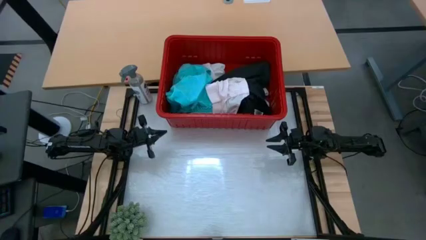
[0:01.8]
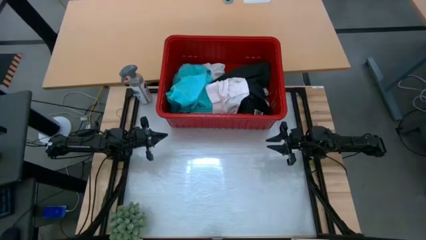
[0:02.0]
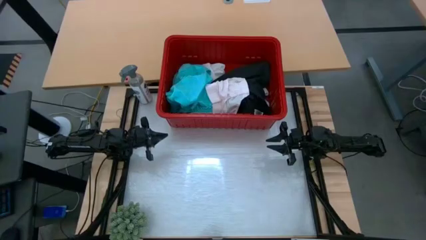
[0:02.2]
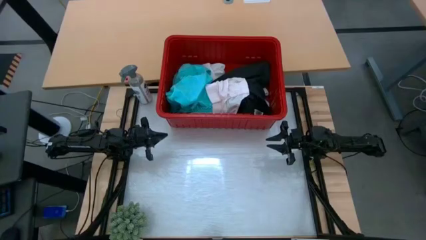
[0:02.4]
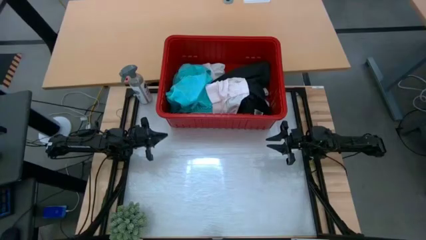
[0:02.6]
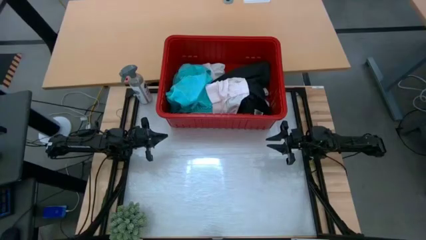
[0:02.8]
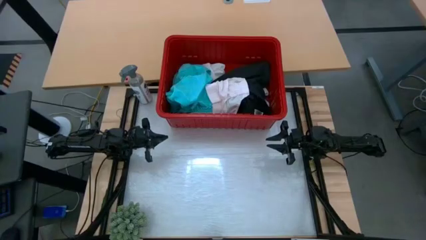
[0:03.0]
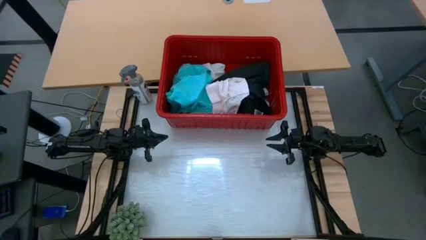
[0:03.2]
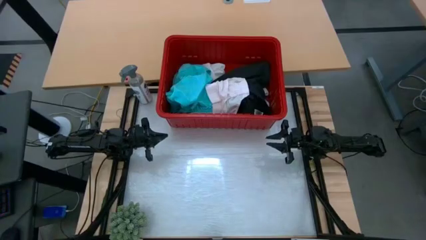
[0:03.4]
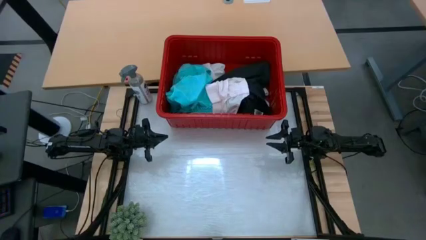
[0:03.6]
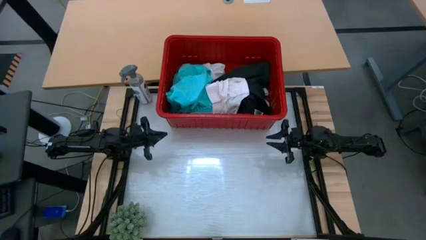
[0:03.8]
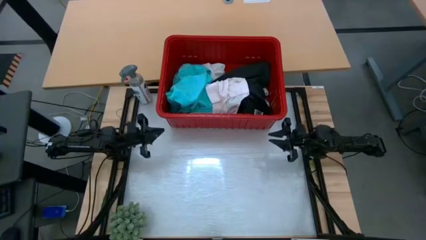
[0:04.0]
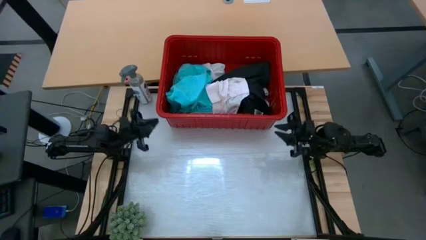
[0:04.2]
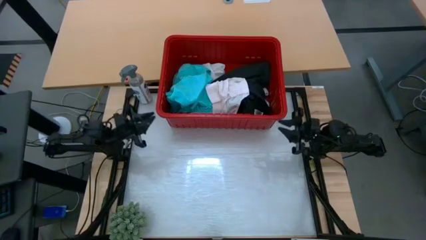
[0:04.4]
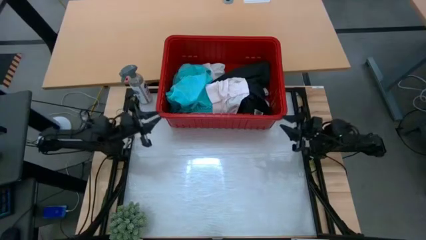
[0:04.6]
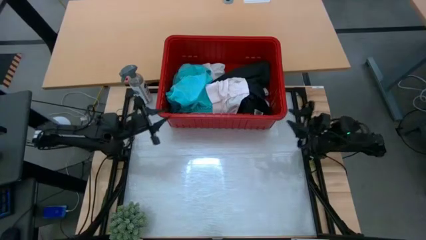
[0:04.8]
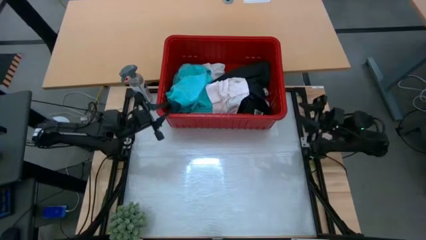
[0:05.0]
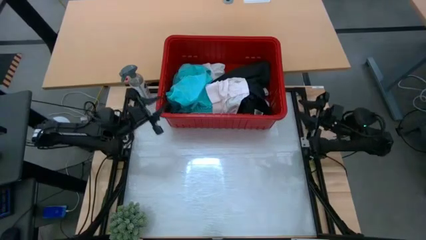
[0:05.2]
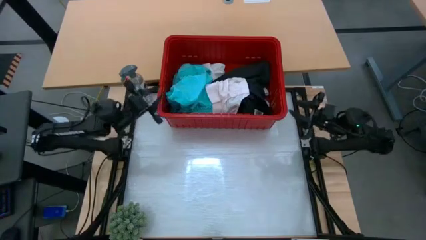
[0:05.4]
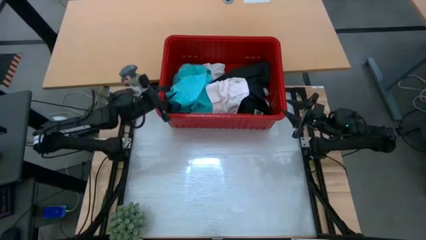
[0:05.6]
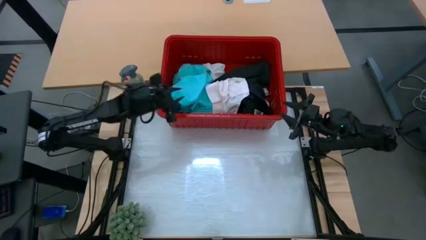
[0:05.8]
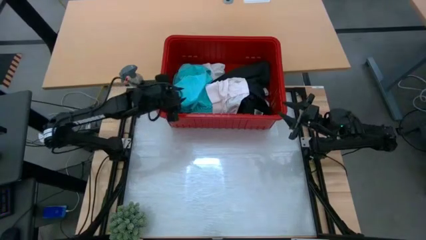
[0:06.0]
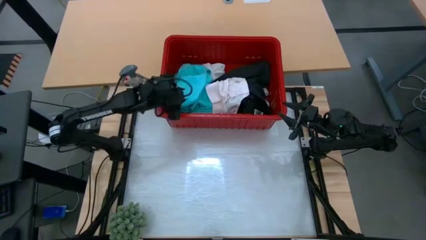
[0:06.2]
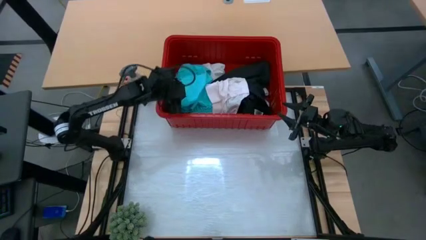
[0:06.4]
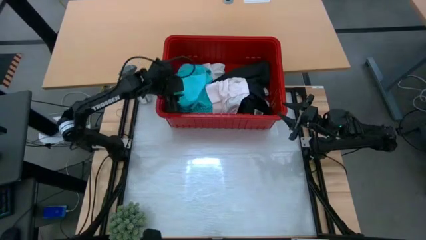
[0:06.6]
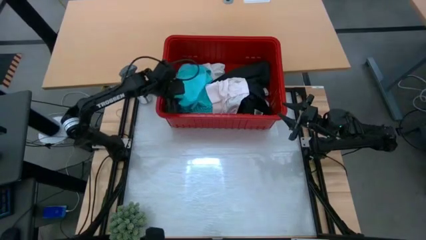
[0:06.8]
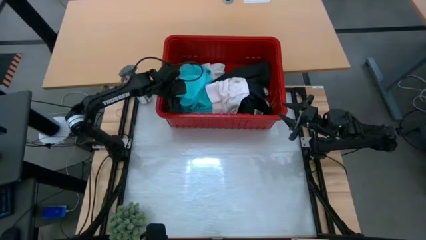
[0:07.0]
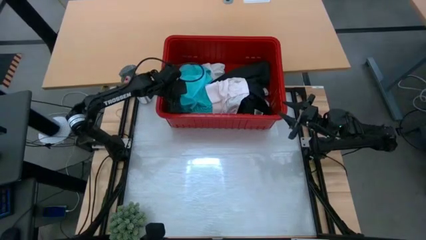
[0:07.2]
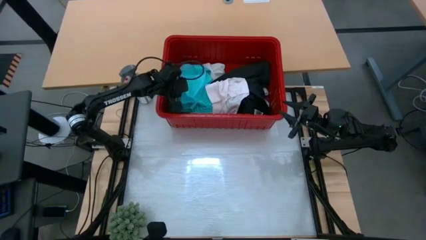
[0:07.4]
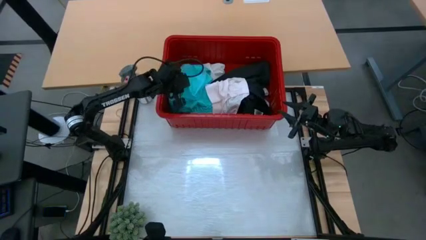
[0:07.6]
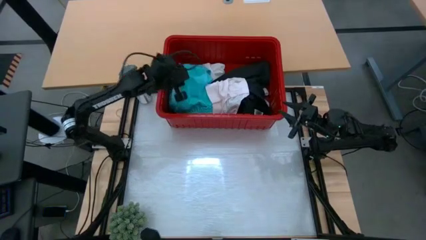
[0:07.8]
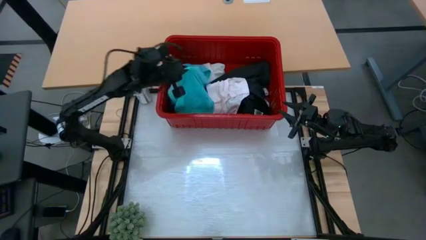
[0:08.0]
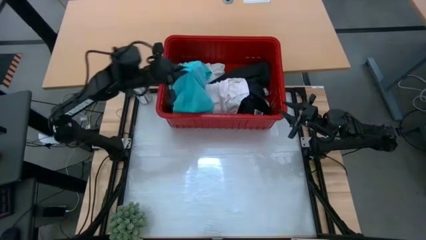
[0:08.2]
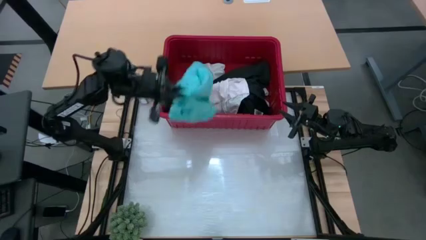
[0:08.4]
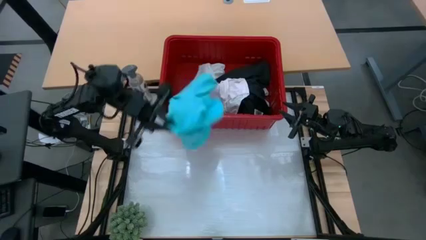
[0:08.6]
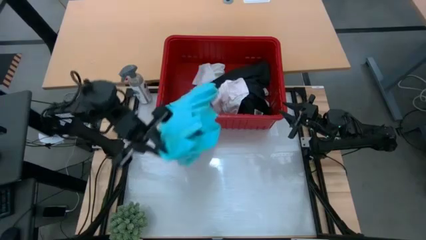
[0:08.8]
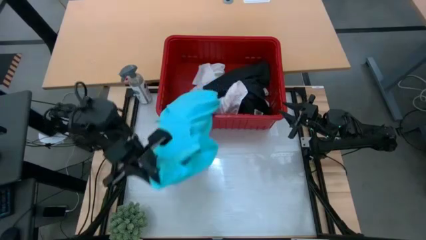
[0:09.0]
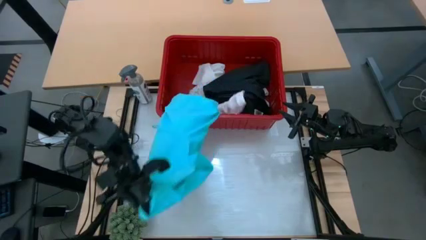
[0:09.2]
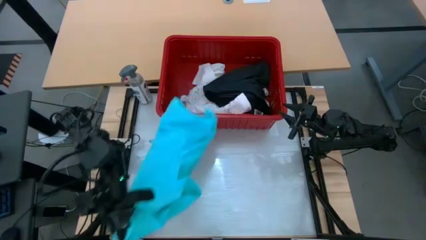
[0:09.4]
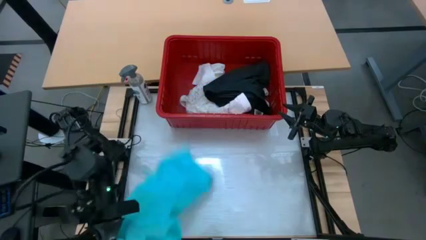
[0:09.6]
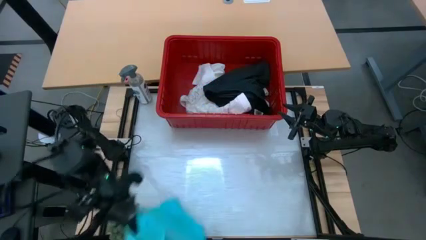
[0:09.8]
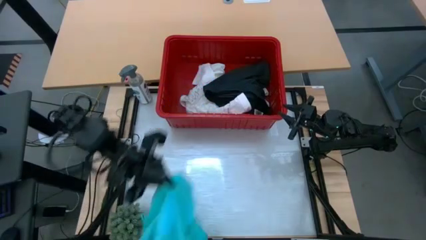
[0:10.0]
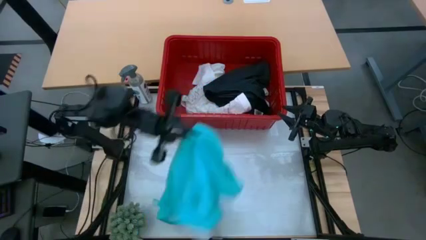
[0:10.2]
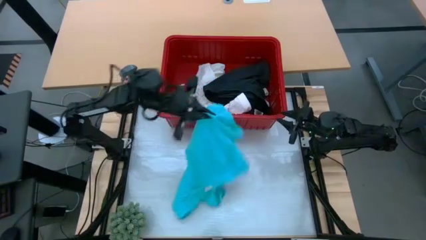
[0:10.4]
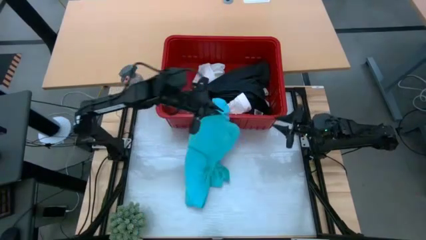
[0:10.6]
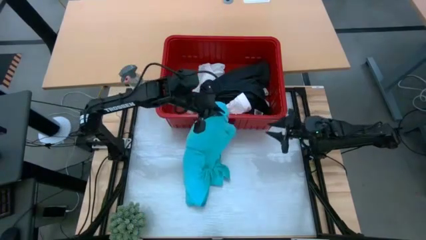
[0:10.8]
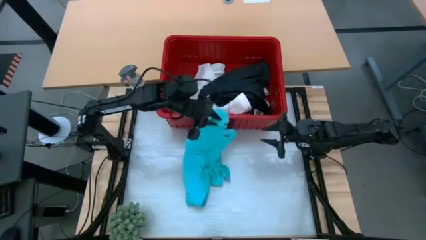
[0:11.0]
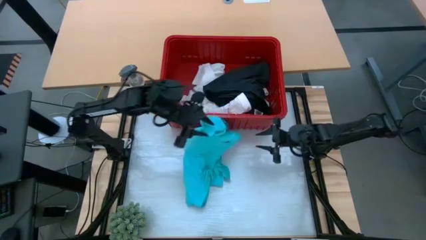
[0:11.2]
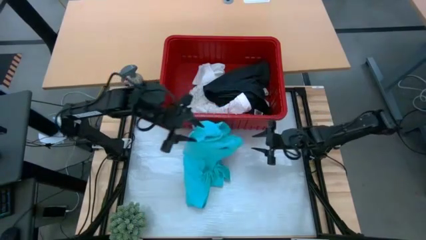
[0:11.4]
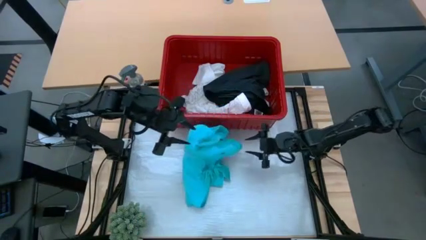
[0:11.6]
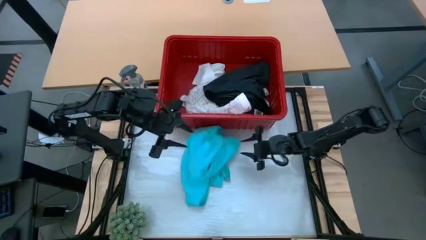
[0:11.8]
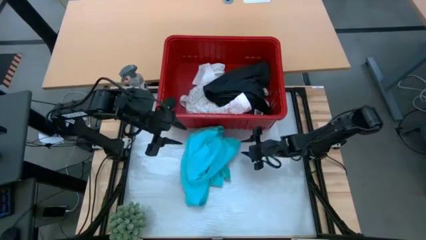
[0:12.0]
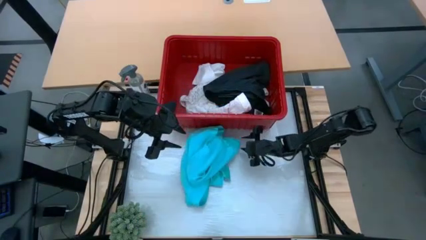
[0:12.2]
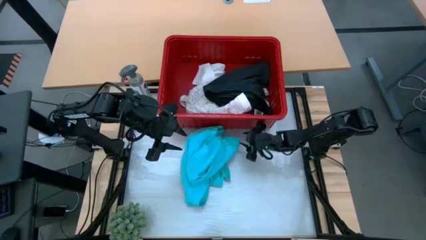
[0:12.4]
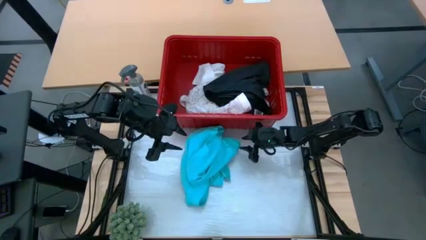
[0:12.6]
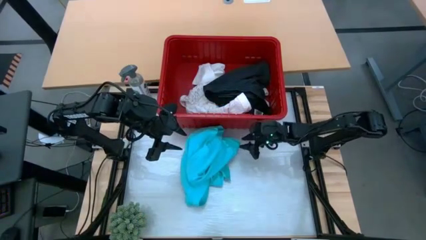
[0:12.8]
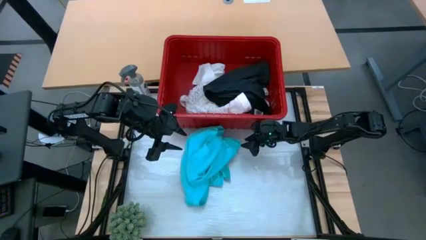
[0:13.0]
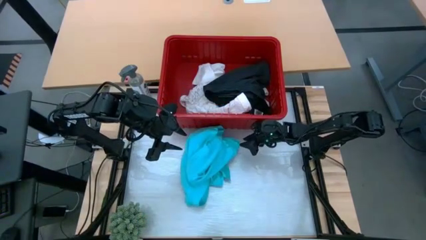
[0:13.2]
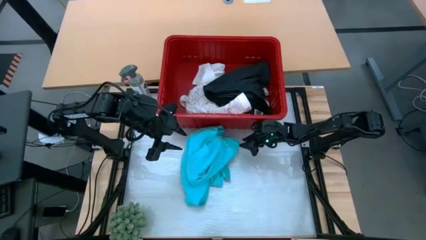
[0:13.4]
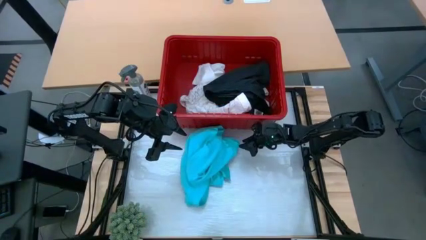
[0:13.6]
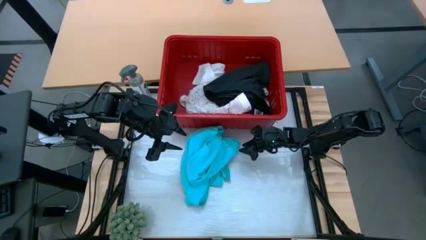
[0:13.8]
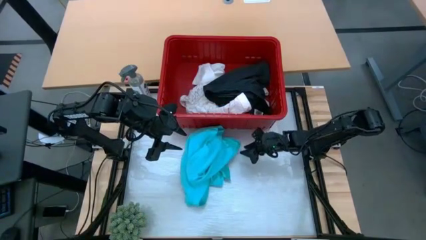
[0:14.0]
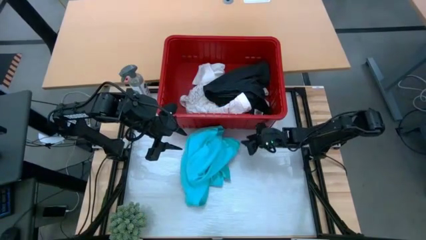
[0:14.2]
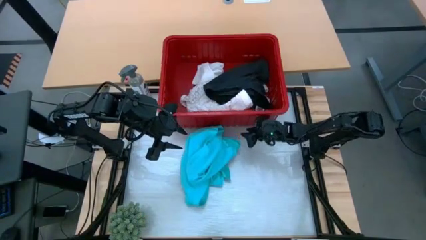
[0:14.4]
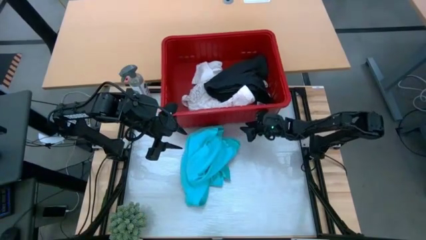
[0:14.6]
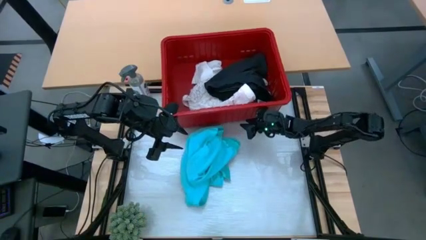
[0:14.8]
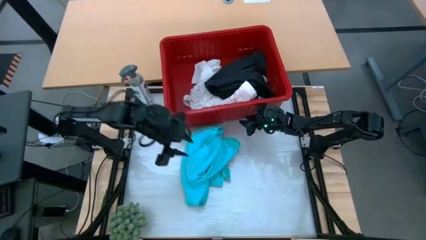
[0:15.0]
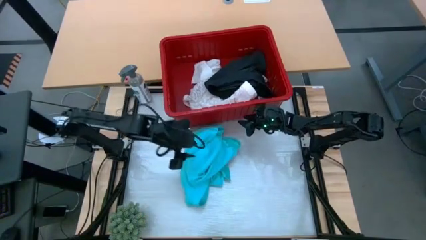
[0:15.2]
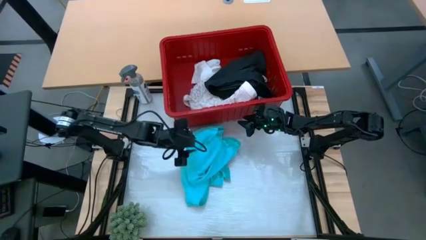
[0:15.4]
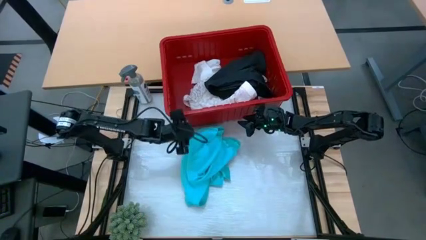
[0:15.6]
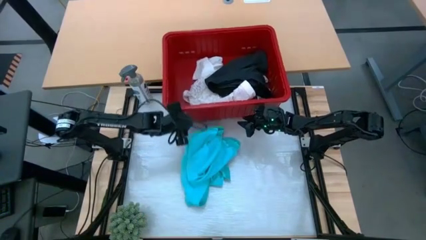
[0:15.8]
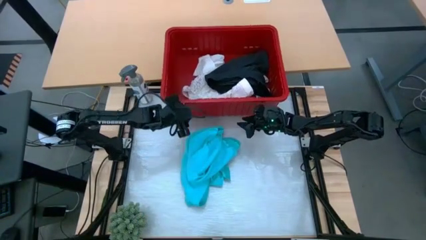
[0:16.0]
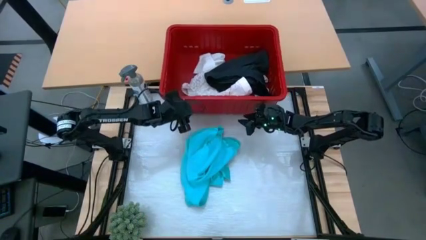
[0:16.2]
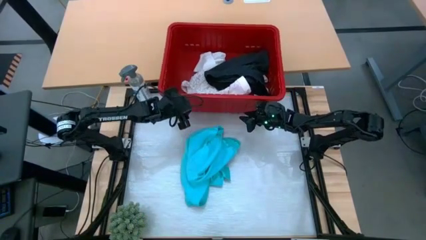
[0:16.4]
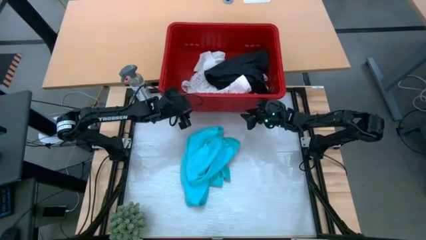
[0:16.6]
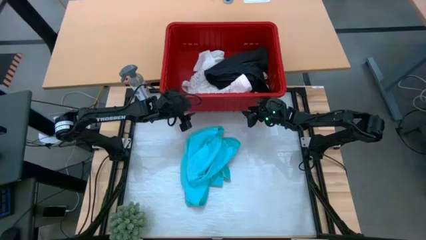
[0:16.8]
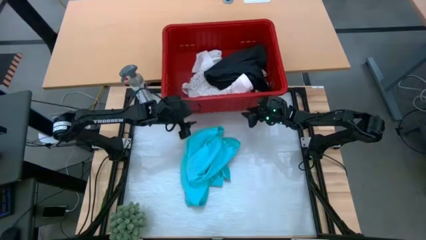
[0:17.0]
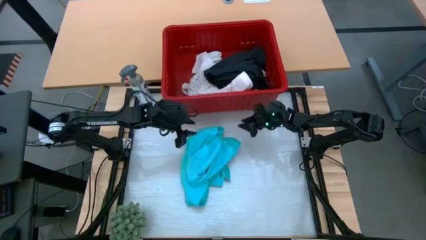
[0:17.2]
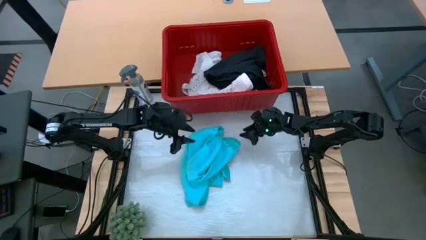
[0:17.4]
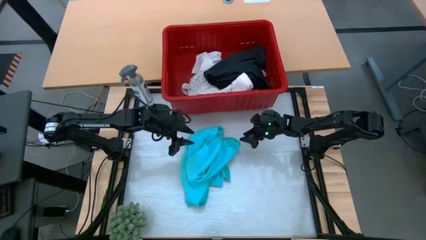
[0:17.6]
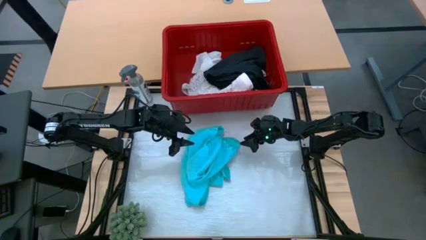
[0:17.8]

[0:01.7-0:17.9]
Task: Fold laundry
Fold the light blue shorts
